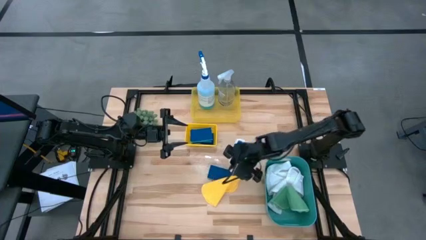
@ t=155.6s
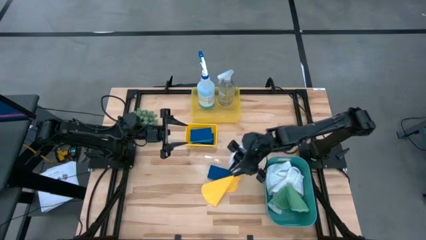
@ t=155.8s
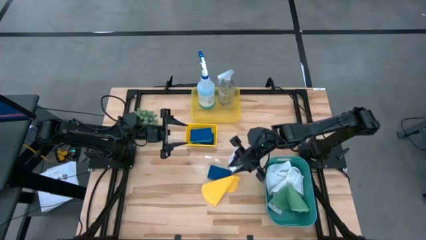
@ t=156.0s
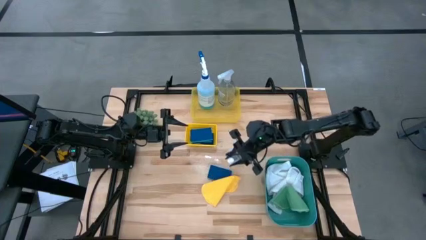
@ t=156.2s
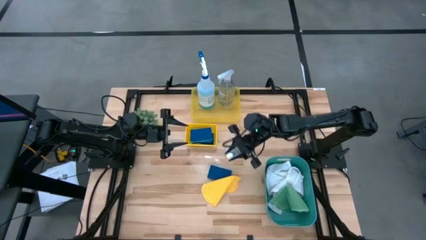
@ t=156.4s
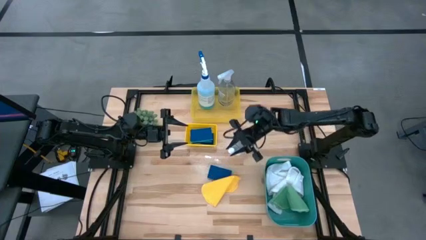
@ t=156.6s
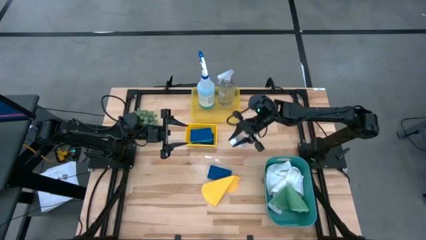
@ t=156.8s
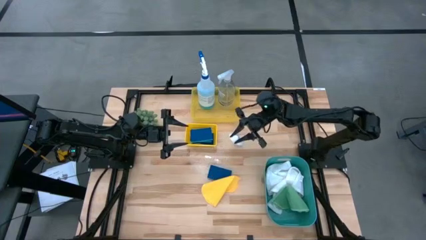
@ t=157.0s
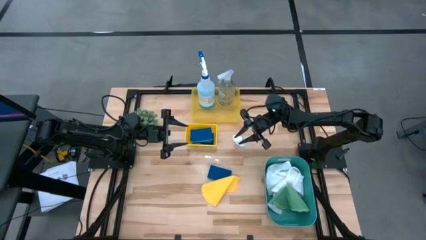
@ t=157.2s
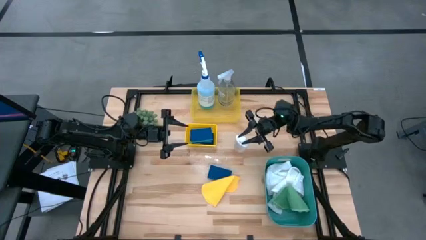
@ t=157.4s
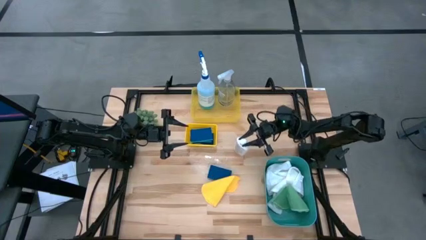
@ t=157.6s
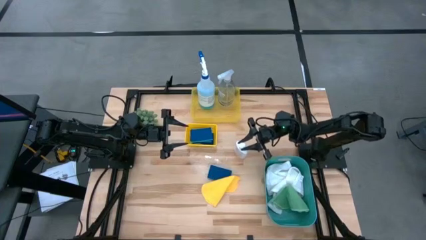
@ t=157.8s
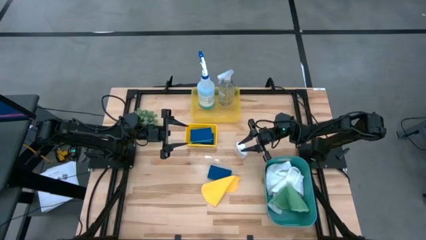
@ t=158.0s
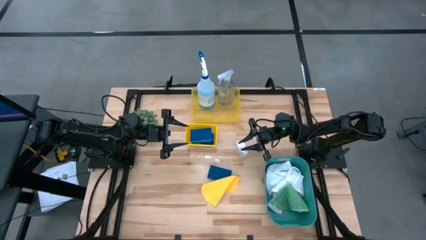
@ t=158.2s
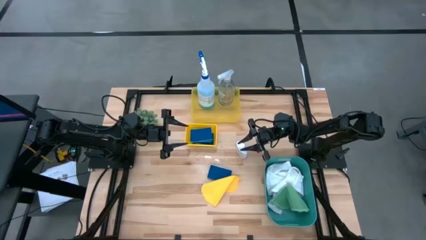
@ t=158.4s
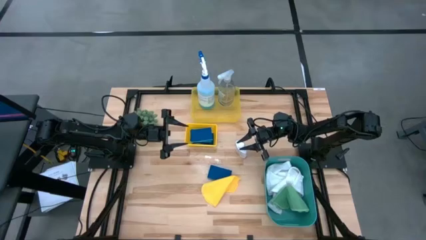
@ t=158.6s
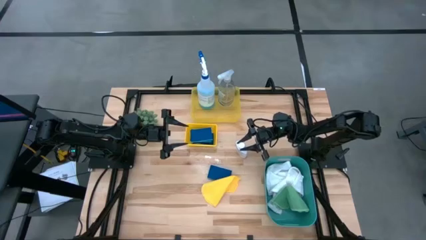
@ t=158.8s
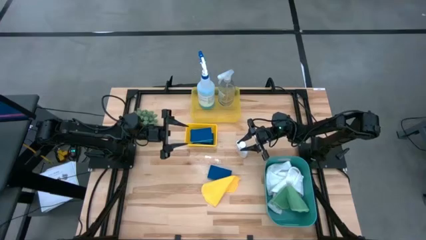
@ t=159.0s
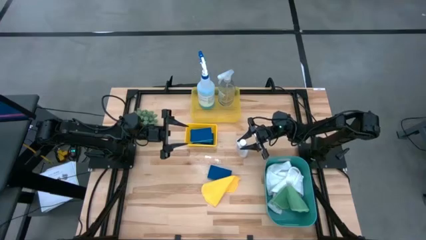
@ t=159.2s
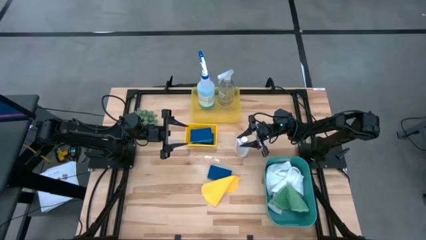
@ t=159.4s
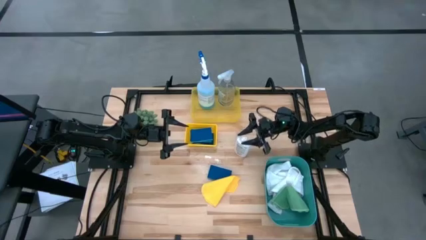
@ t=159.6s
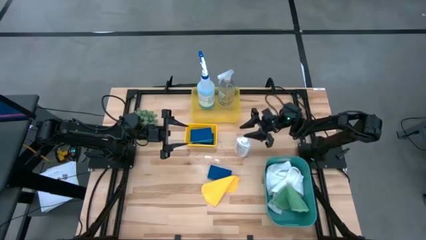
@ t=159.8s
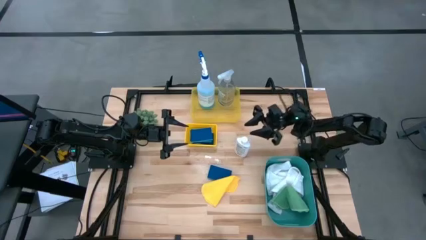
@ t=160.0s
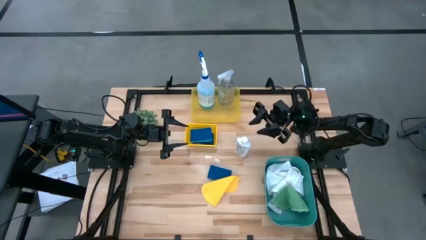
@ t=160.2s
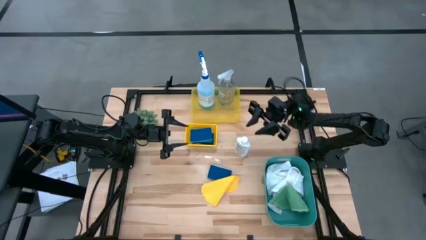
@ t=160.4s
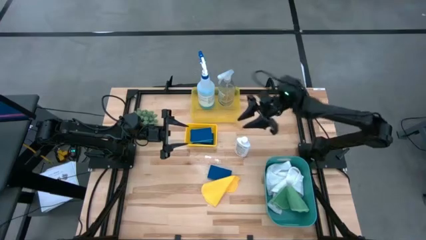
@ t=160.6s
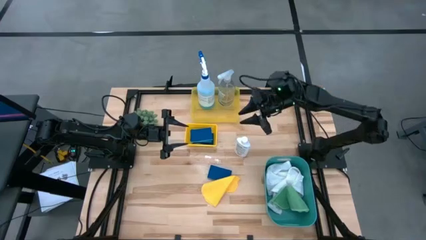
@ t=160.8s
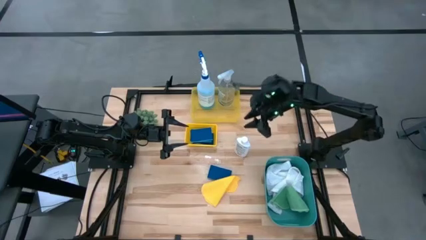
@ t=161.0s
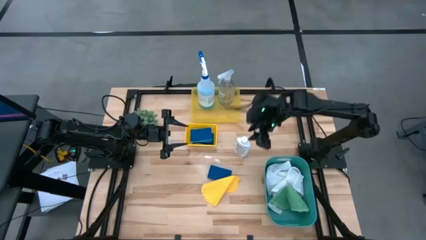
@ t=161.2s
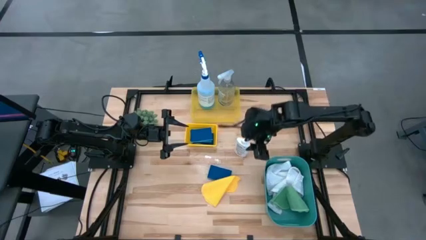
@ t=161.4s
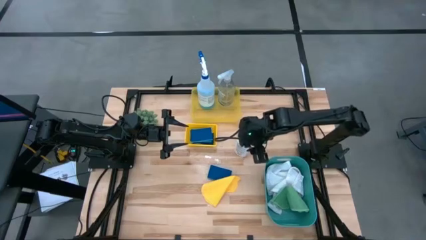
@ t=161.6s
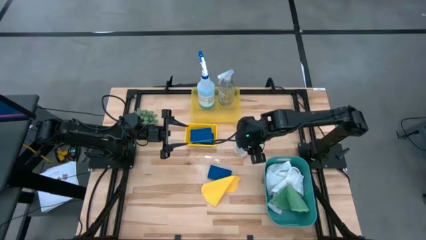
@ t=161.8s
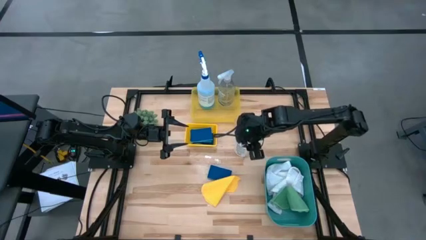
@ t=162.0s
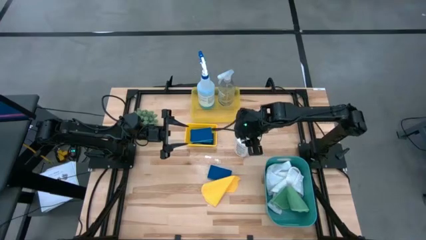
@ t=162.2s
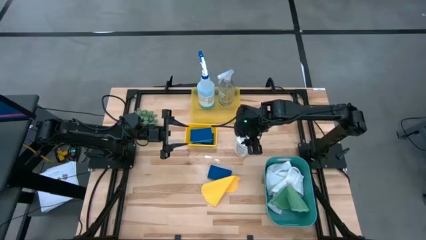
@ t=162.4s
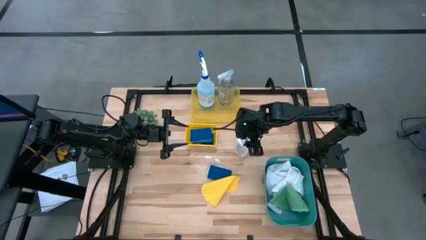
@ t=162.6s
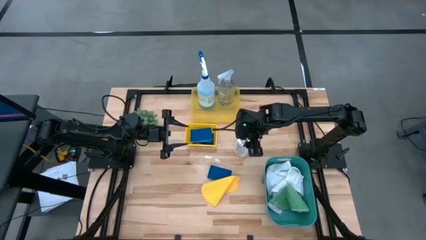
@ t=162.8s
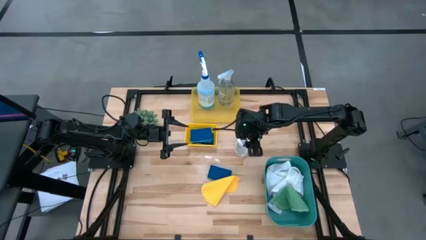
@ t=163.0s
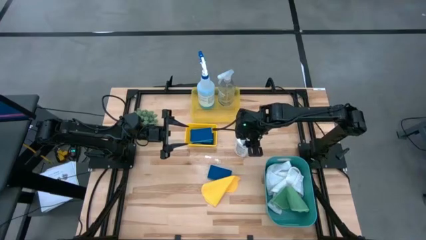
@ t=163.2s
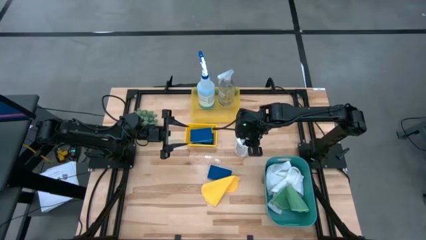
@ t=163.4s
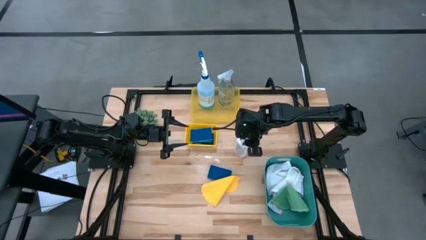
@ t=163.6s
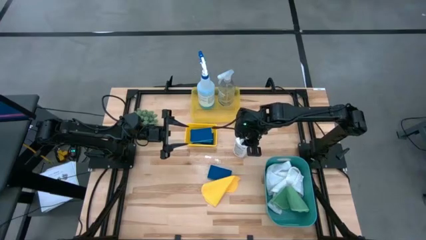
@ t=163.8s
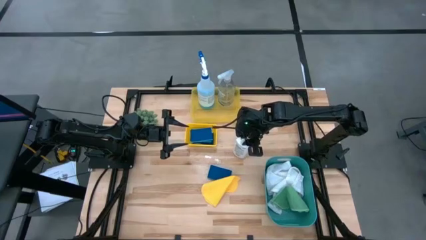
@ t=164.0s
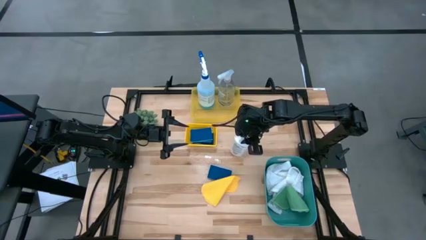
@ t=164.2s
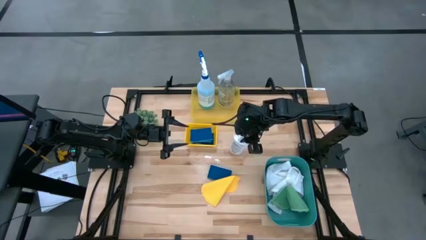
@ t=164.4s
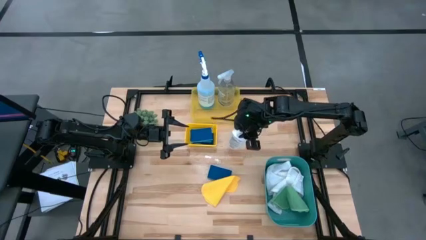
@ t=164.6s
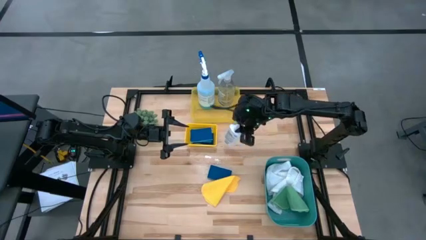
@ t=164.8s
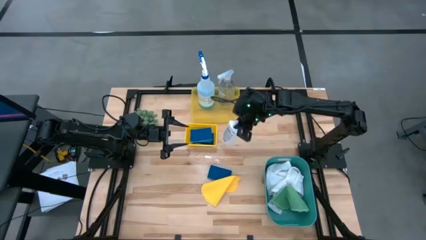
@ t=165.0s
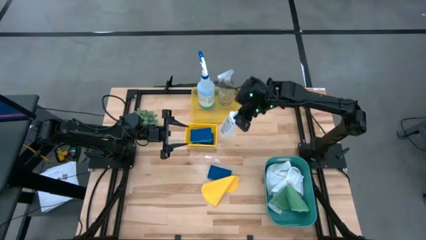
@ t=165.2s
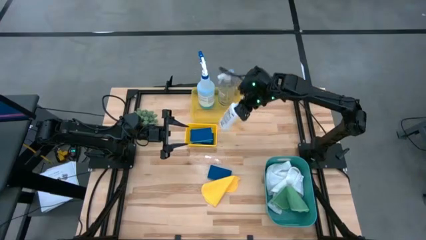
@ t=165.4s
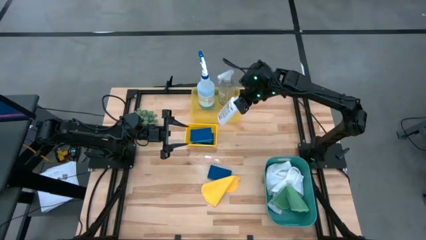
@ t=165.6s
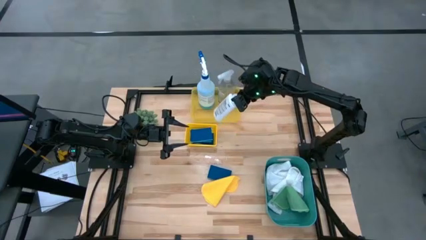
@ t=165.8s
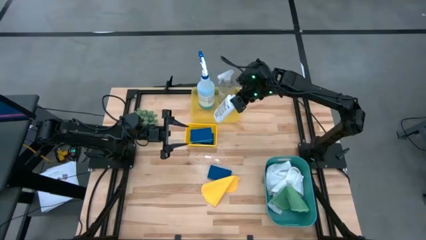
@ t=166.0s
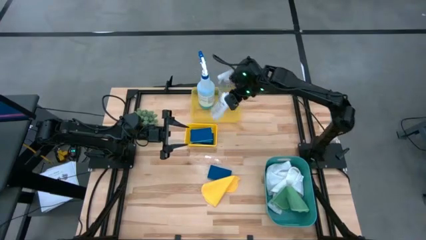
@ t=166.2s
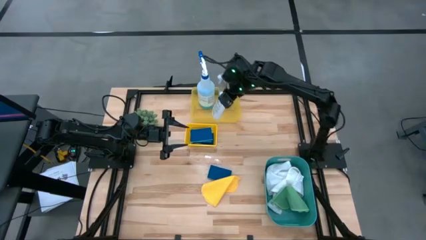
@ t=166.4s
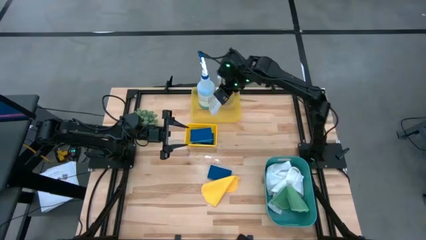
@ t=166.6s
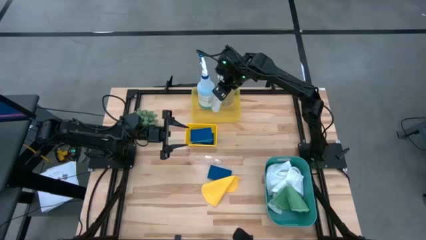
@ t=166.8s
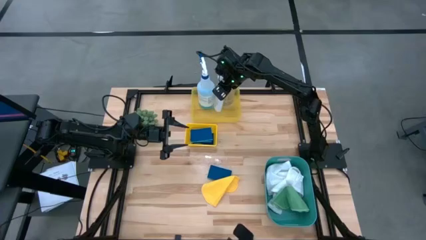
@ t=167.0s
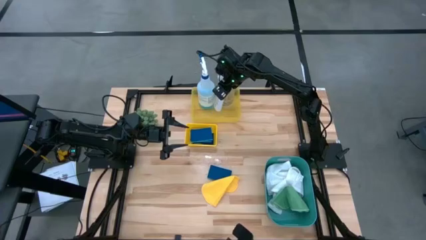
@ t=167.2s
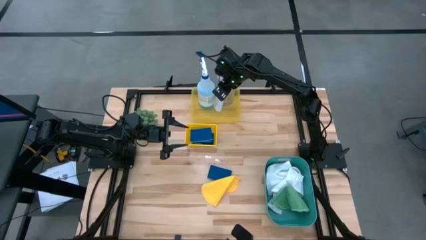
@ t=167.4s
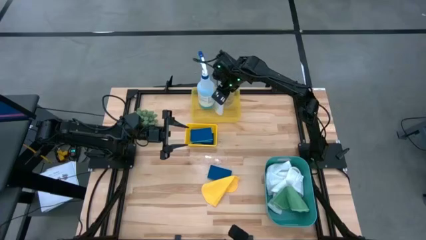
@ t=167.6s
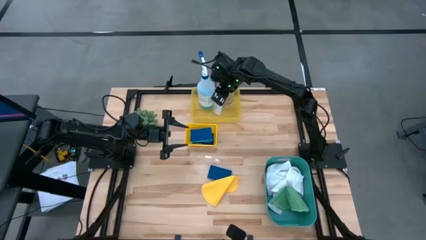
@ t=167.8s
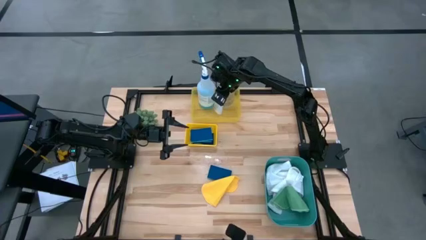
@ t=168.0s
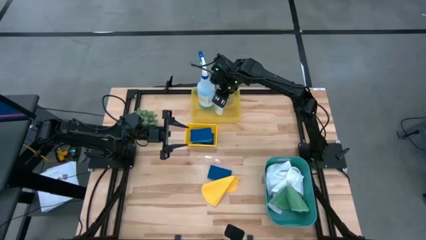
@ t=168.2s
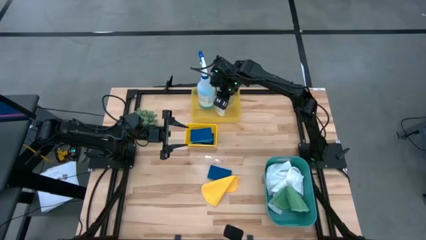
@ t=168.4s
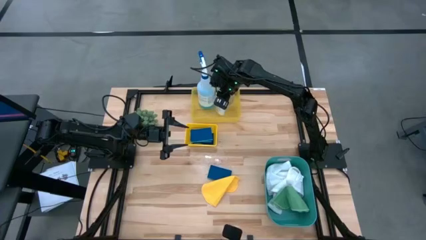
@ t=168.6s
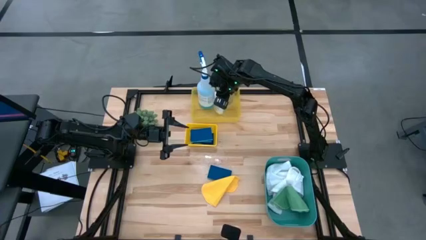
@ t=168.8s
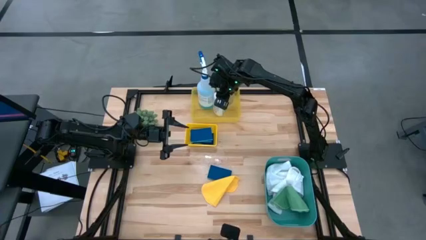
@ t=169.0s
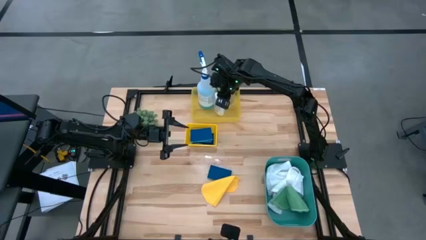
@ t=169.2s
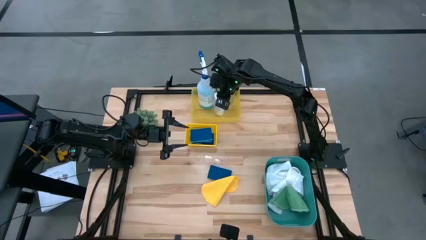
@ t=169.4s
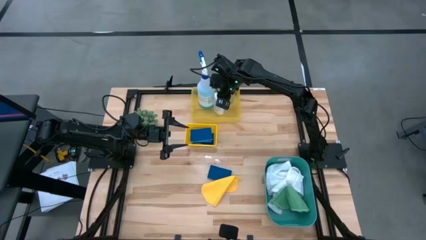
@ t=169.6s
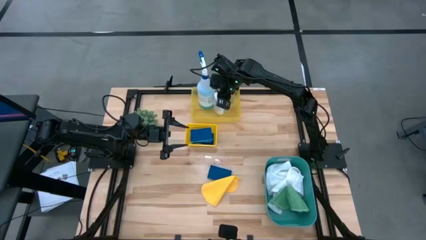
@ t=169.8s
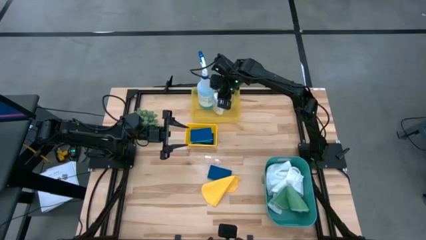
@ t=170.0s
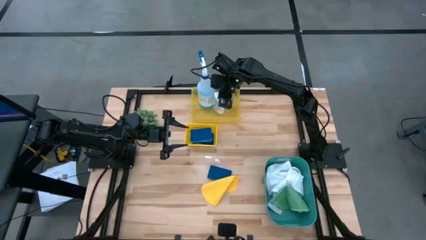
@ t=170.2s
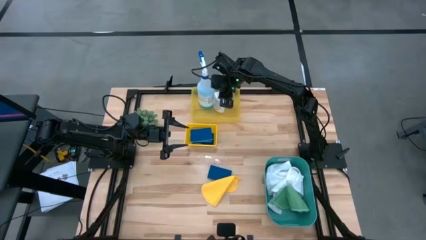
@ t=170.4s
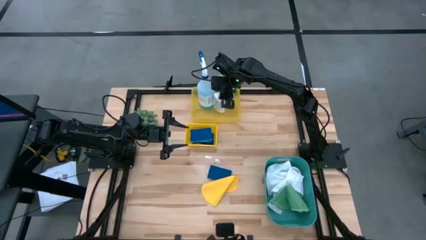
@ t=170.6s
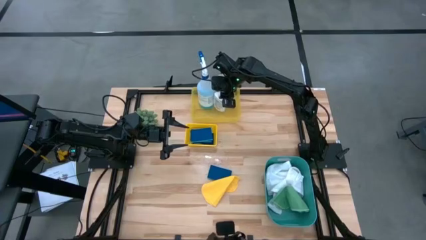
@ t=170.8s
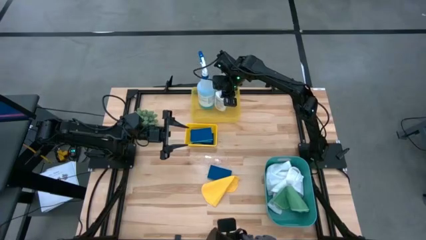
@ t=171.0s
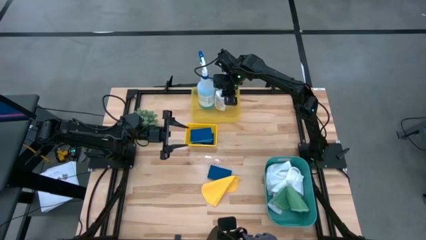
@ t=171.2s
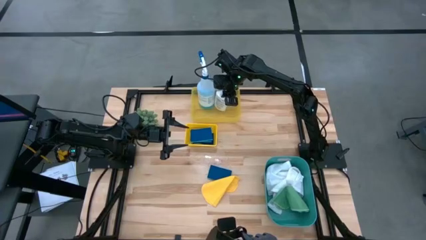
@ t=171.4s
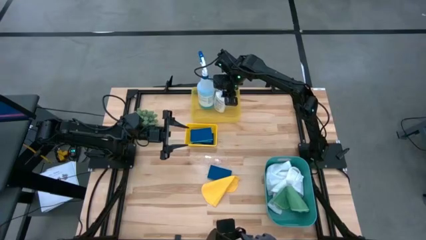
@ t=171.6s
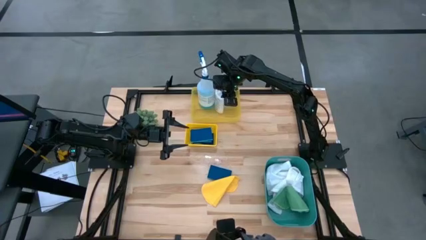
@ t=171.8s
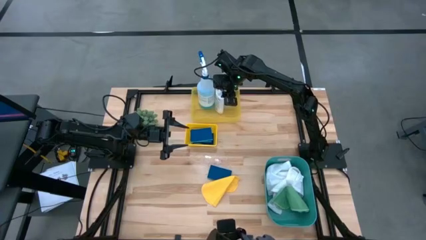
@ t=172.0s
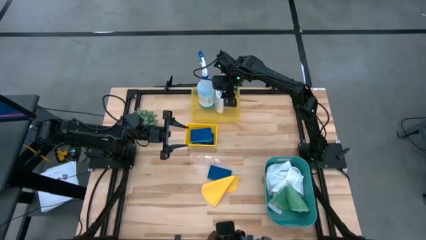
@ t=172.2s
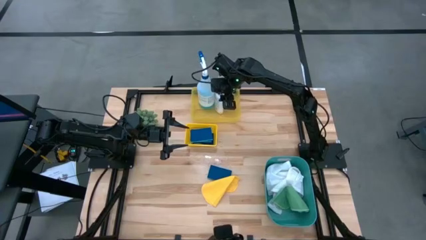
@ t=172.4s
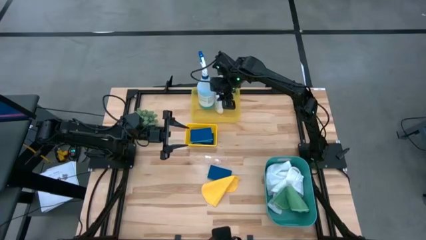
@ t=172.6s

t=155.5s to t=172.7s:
Task: Pick & Place Kitchen Items
Put the plastic restorer bottle into the top yellow bin
